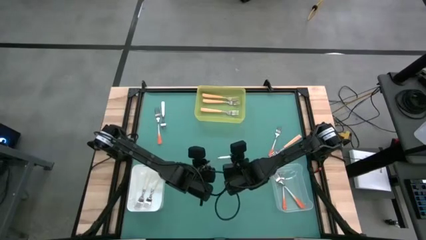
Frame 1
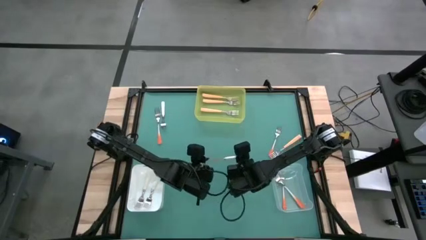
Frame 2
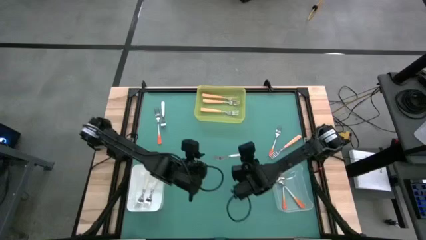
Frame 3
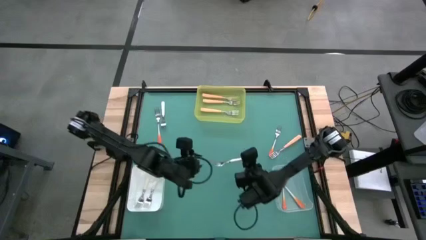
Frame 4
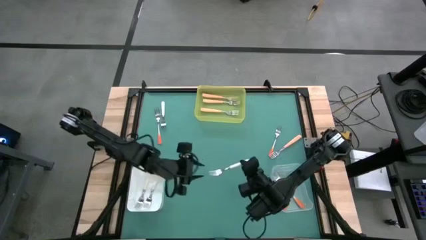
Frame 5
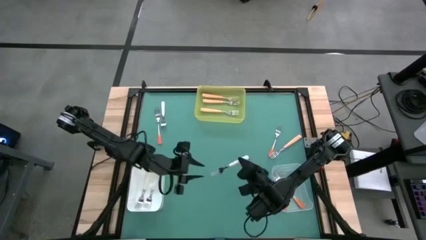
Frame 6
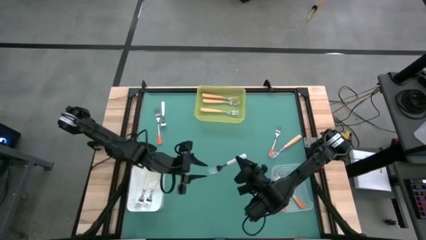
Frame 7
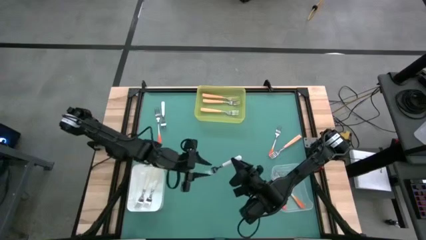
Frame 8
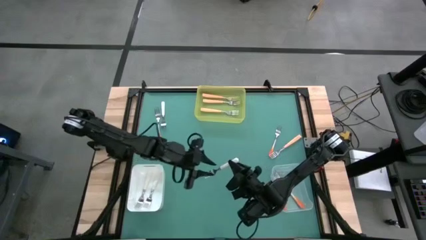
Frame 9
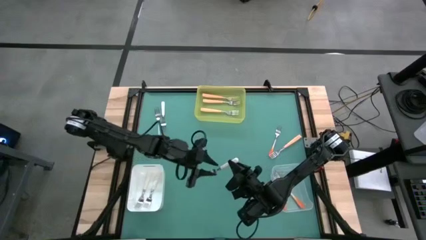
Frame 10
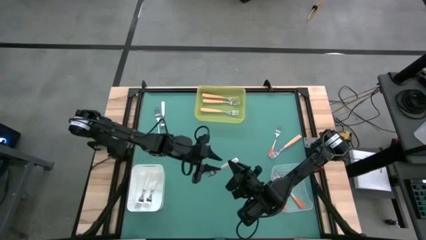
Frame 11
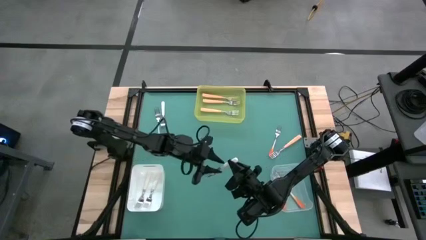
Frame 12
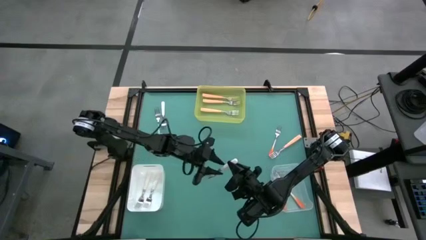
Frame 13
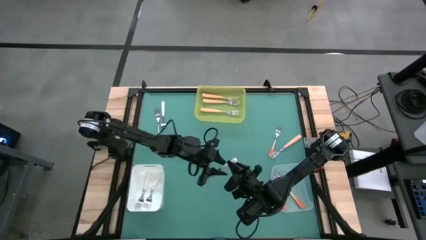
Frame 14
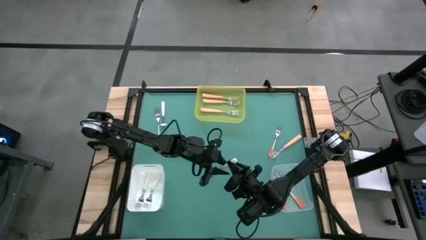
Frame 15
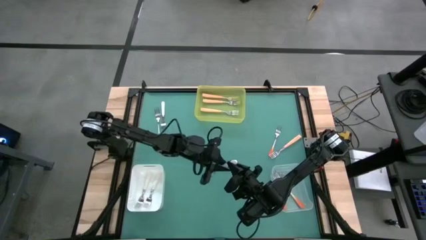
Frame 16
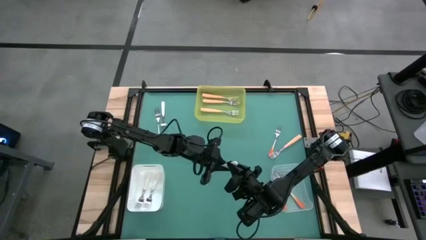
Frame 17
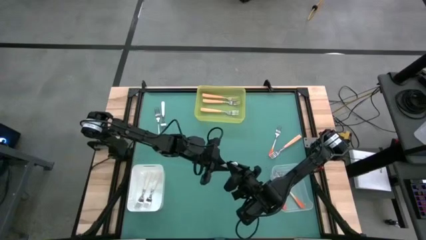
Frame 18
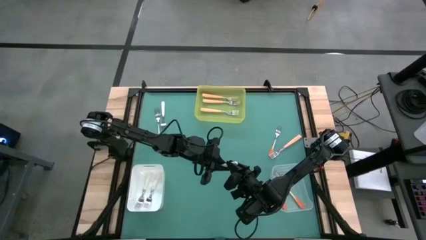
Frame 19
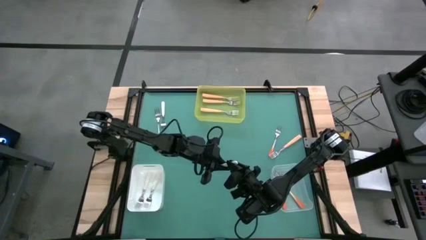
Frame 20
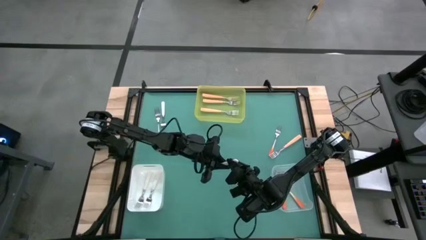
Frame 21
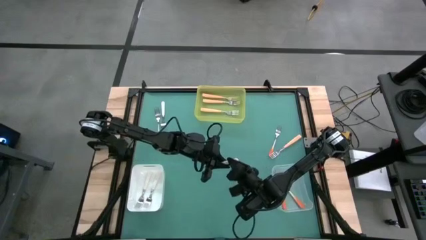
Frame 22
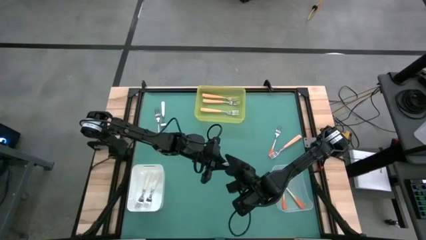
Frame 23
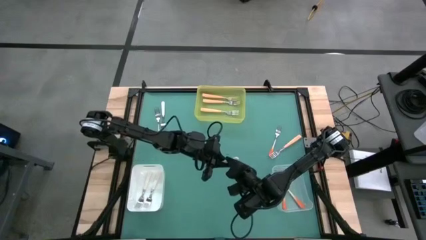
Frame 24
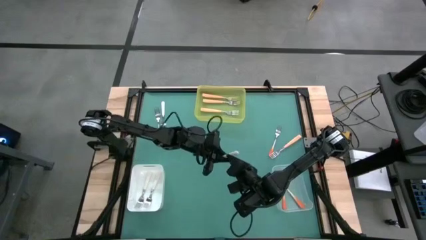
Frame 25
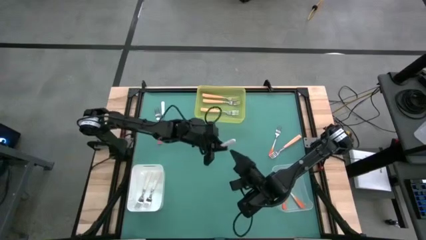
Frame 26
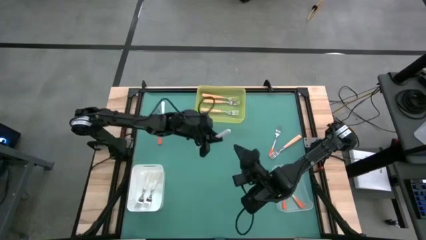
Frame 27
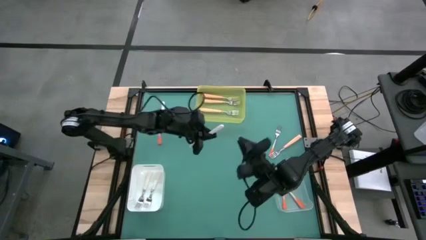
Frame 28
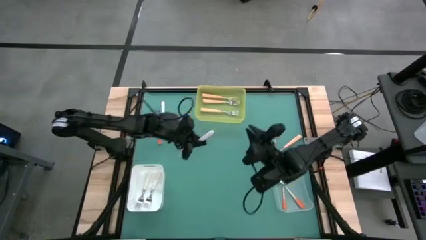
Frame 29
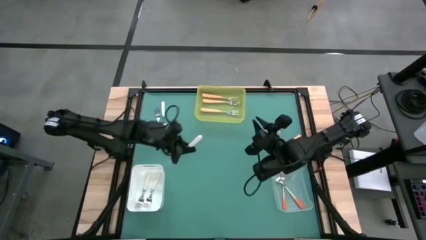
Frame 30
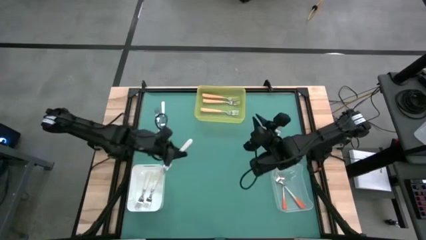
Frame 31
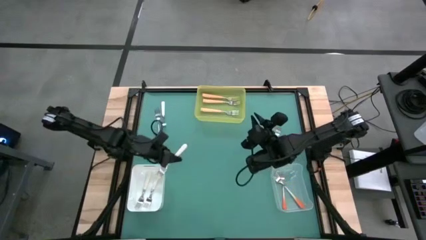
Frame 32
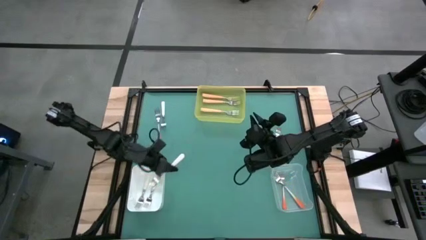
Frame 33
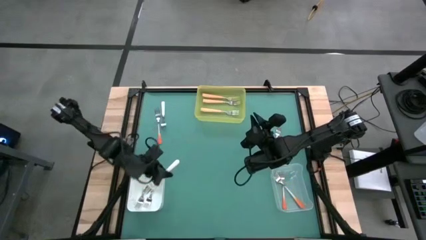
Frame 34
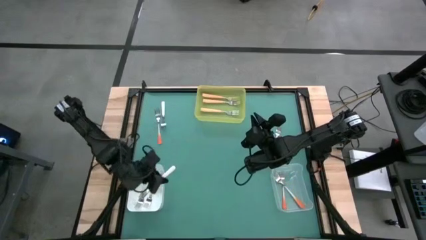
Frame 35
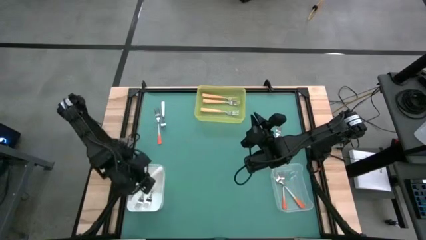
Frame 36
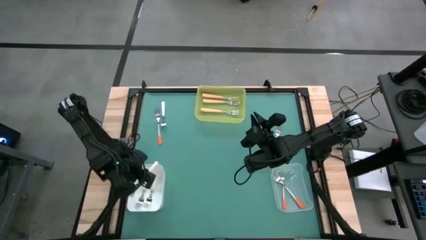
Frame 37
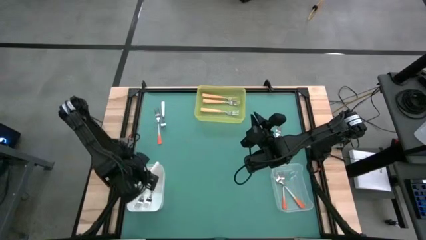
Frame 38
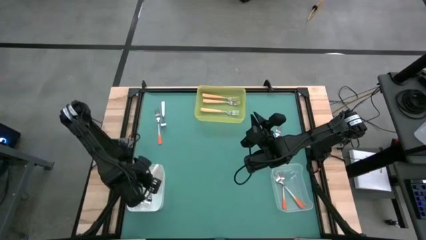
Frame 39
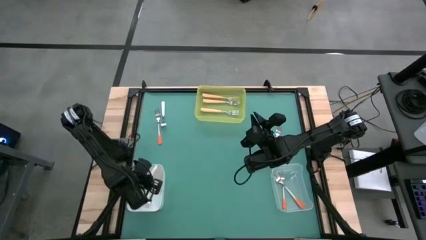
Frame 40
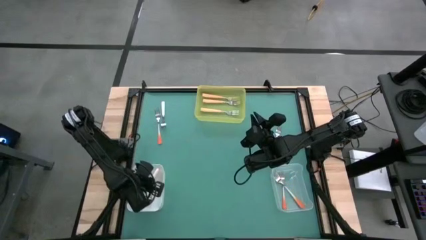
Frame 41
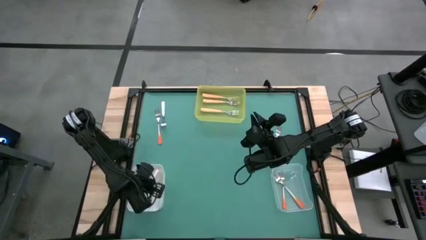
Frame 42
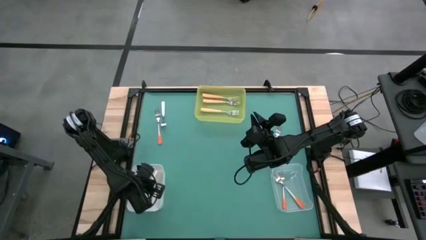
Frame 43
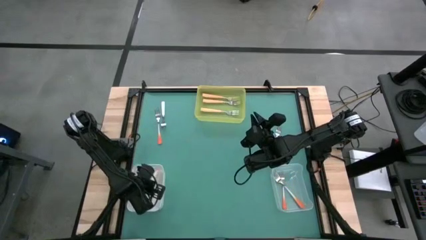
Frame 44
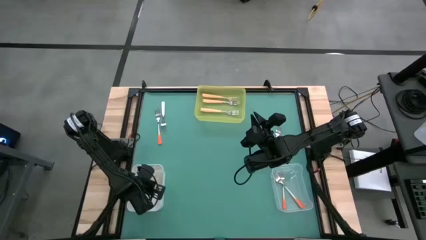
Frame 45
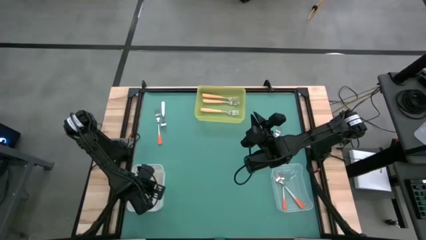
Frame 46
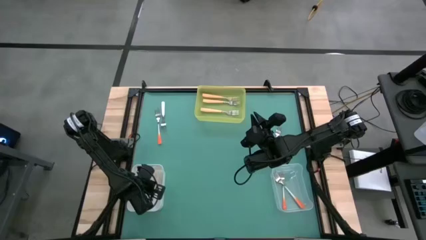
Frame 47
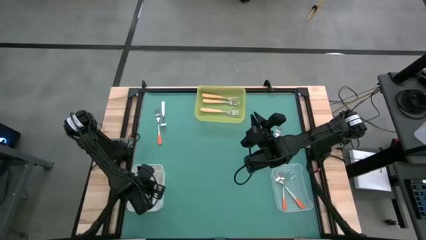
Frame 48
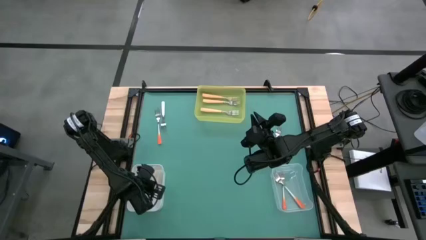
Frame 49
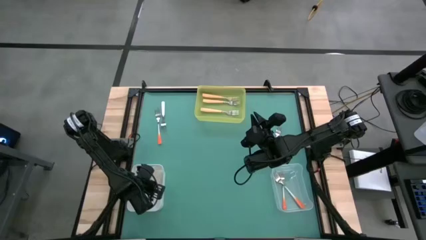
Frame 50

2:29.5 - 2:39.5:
Task: Sort silverware by color (type)
Put the white fork into the white bin
